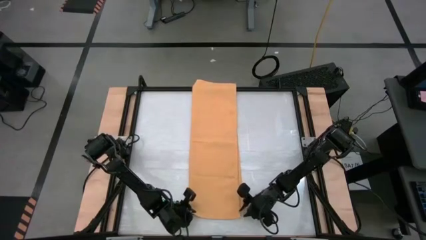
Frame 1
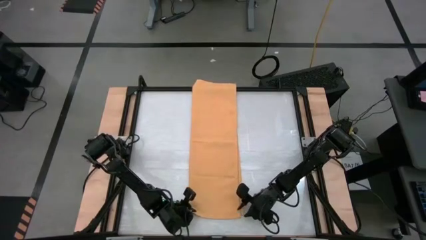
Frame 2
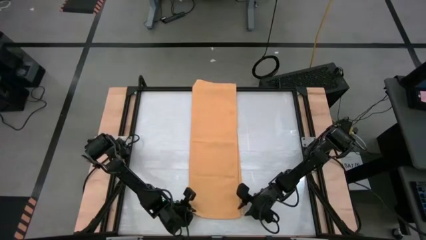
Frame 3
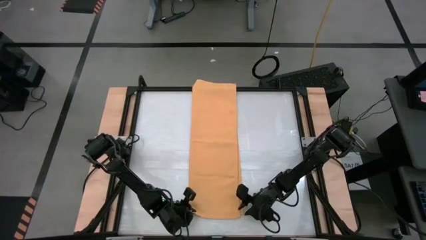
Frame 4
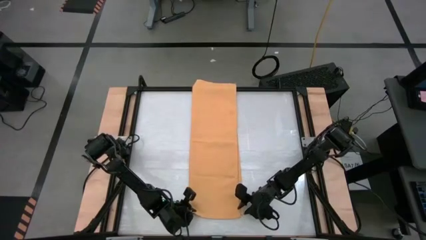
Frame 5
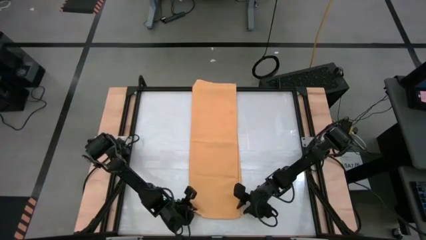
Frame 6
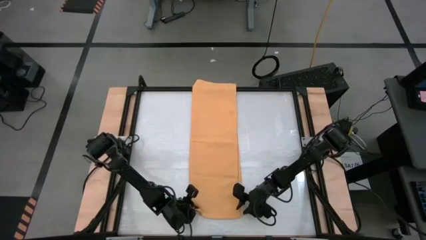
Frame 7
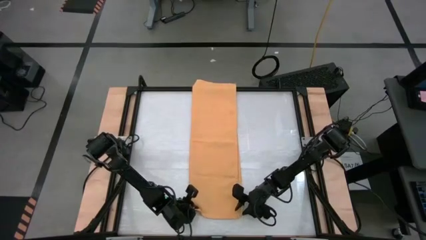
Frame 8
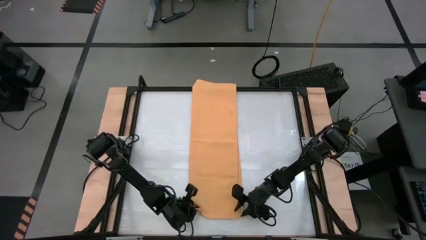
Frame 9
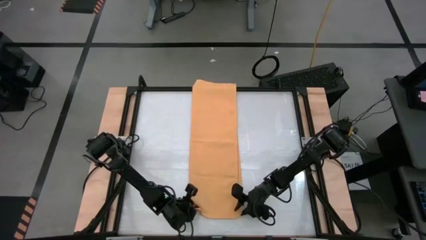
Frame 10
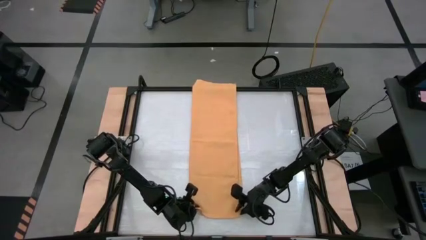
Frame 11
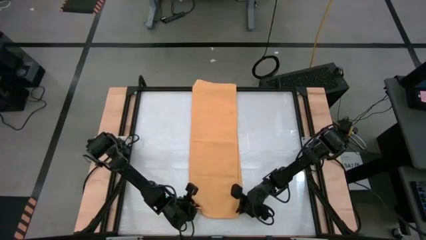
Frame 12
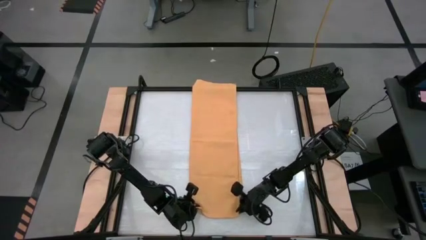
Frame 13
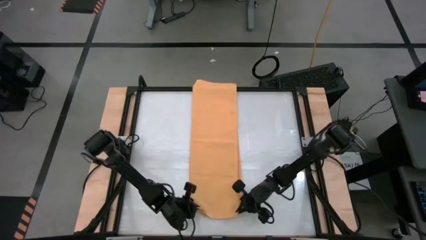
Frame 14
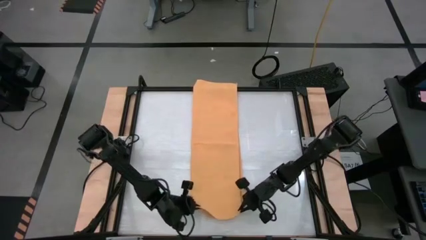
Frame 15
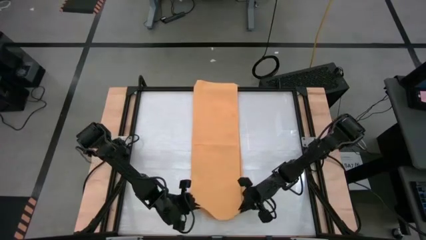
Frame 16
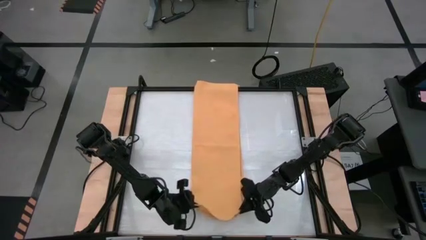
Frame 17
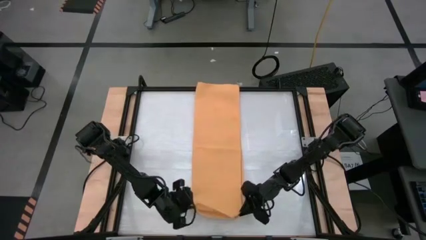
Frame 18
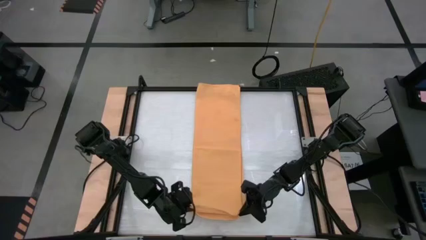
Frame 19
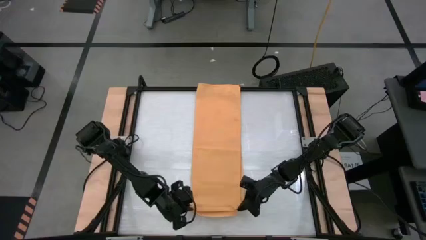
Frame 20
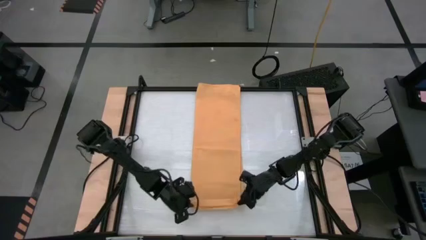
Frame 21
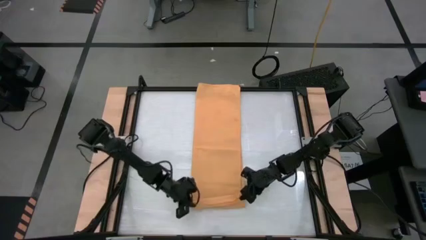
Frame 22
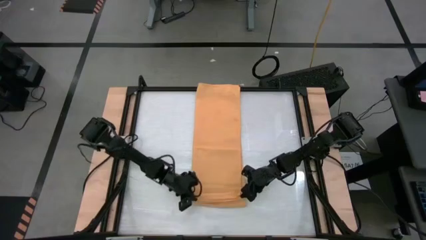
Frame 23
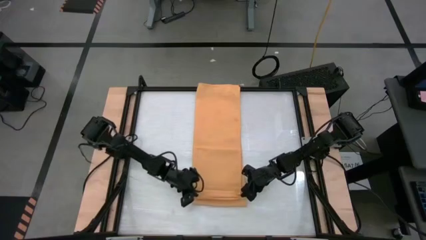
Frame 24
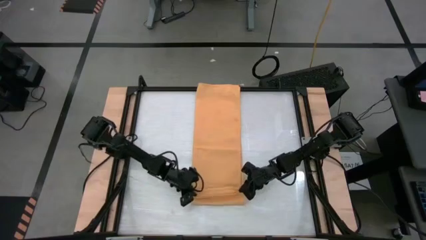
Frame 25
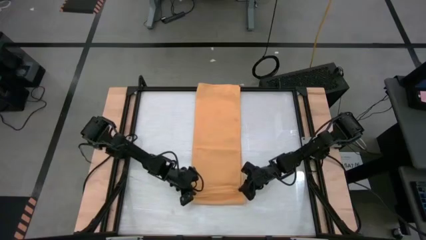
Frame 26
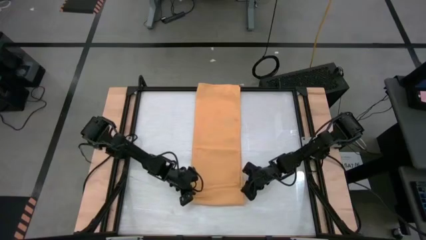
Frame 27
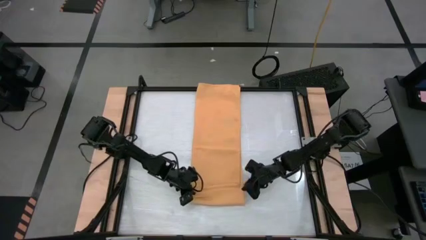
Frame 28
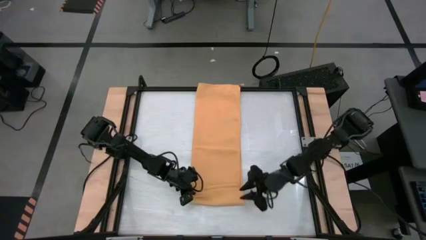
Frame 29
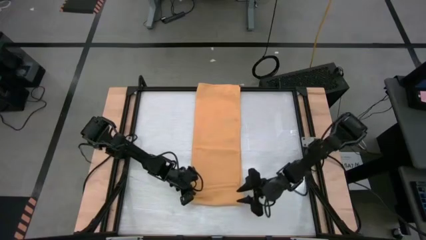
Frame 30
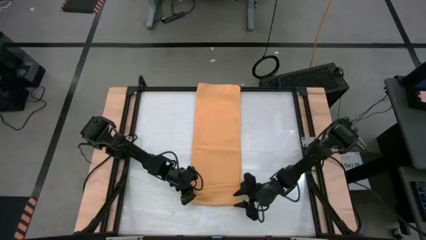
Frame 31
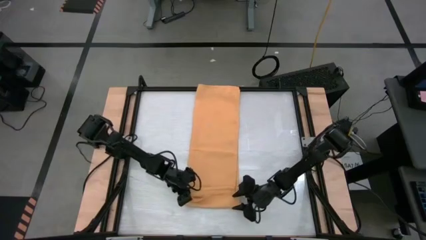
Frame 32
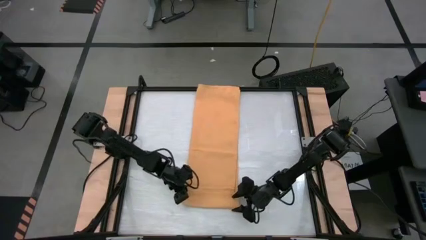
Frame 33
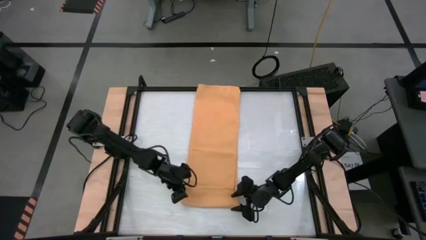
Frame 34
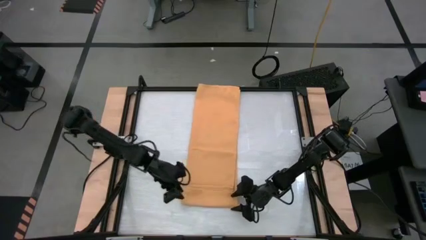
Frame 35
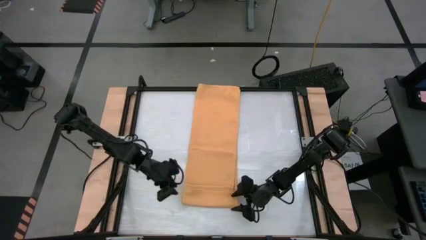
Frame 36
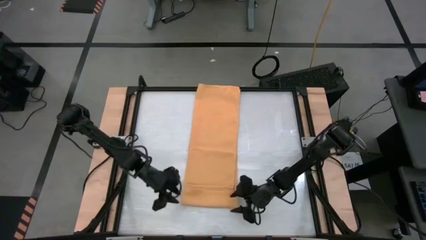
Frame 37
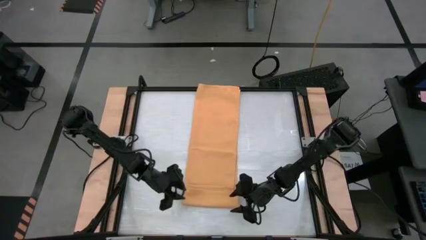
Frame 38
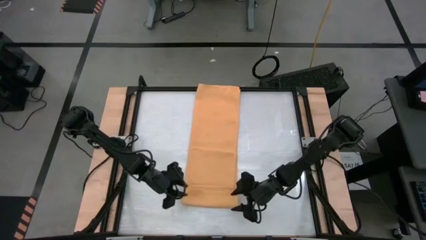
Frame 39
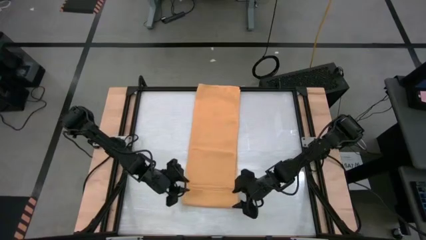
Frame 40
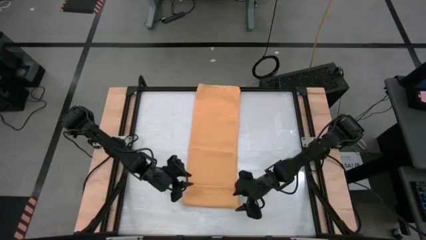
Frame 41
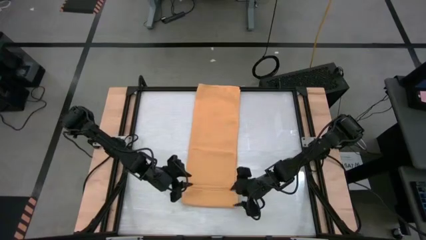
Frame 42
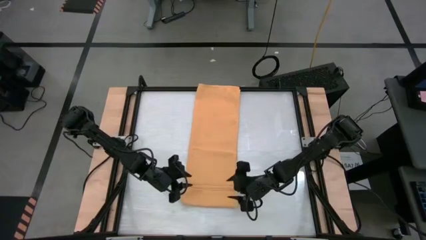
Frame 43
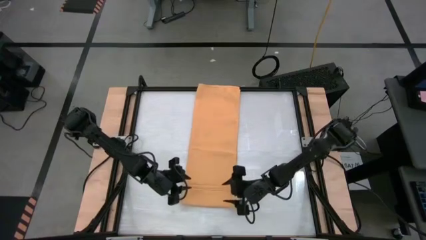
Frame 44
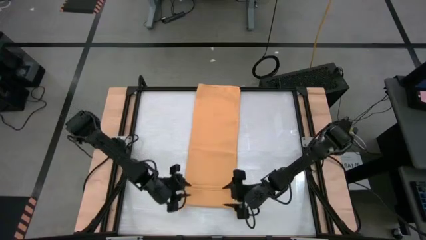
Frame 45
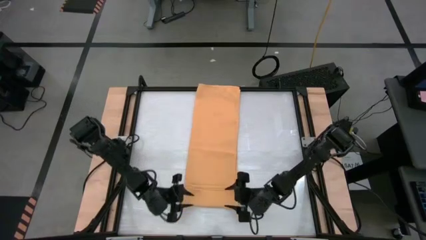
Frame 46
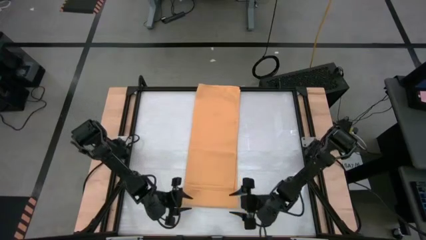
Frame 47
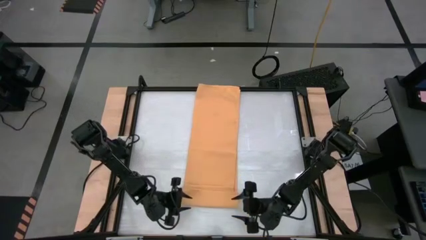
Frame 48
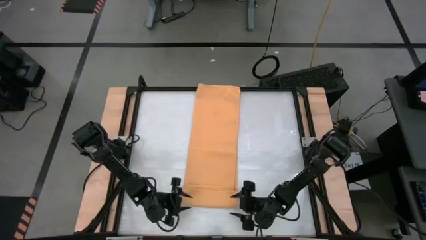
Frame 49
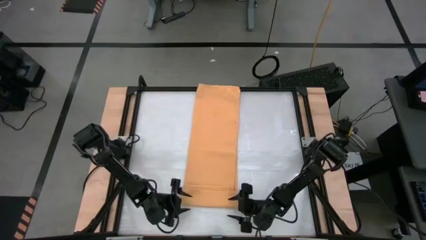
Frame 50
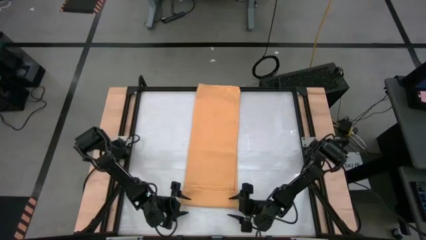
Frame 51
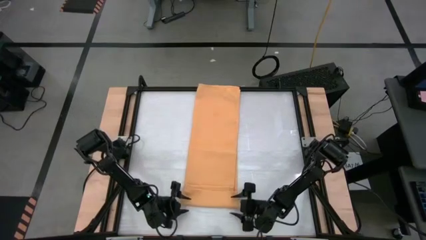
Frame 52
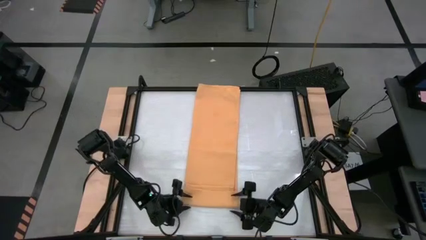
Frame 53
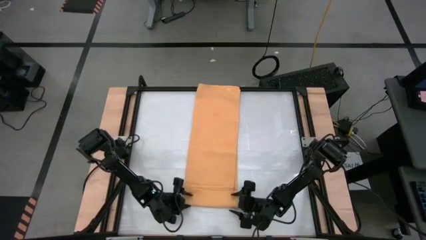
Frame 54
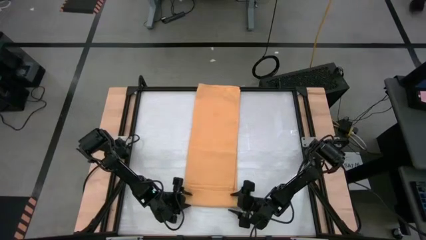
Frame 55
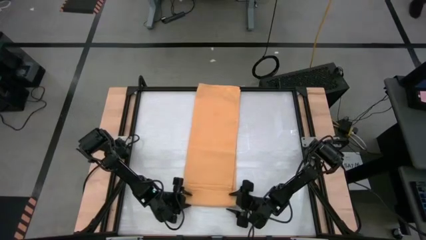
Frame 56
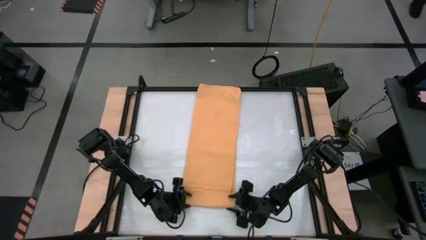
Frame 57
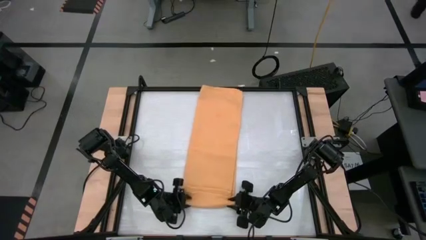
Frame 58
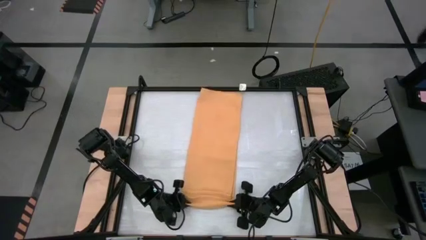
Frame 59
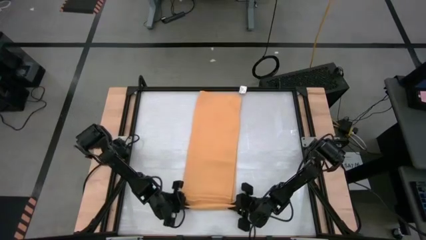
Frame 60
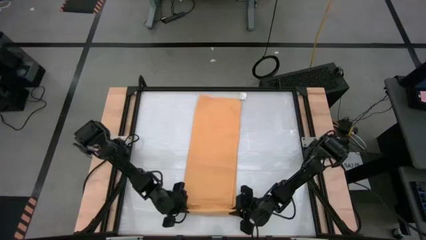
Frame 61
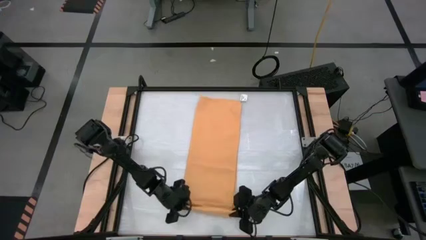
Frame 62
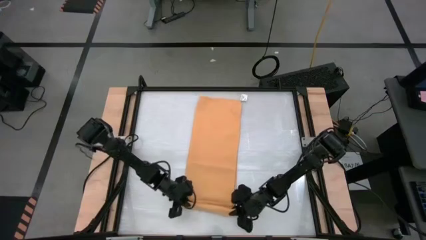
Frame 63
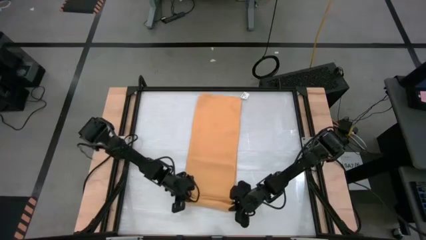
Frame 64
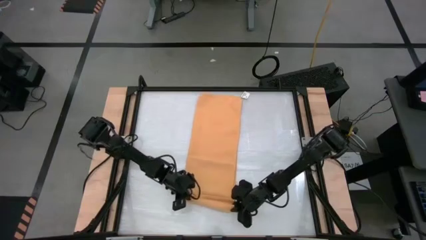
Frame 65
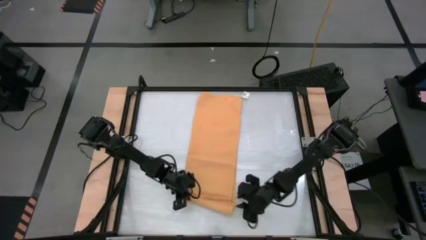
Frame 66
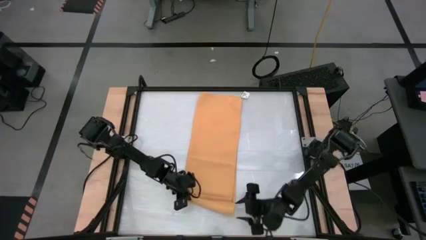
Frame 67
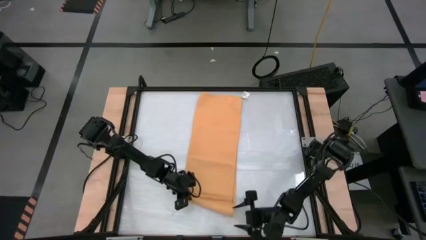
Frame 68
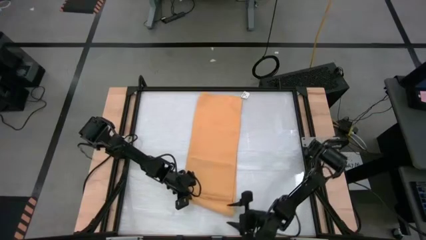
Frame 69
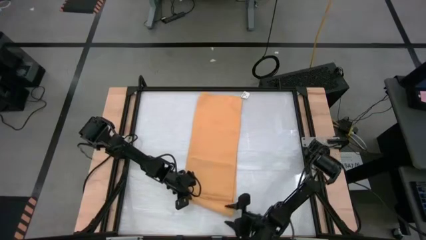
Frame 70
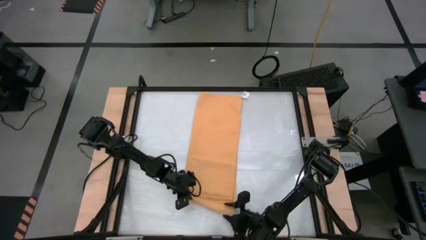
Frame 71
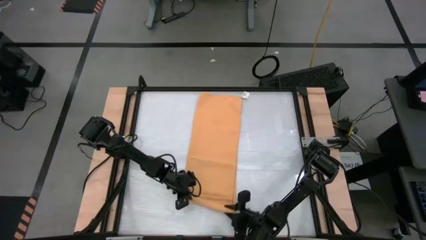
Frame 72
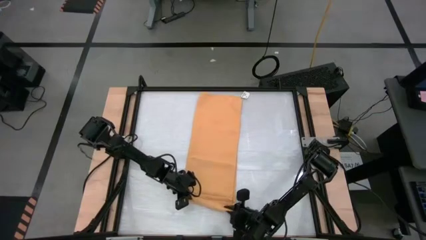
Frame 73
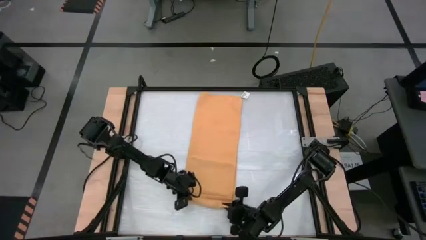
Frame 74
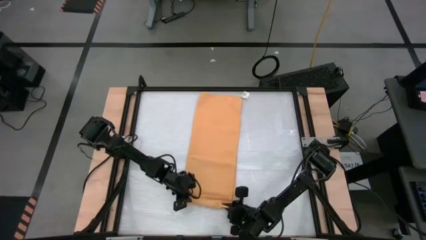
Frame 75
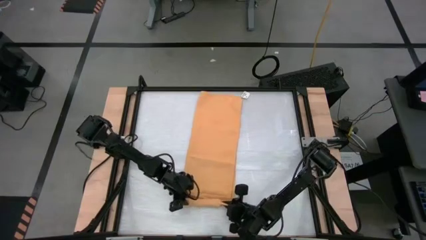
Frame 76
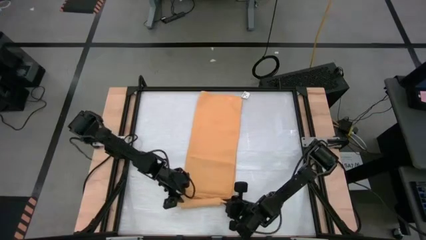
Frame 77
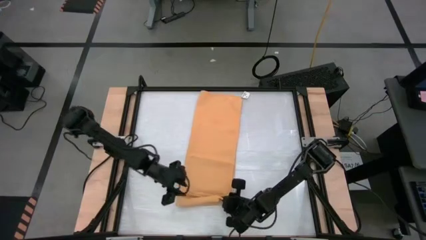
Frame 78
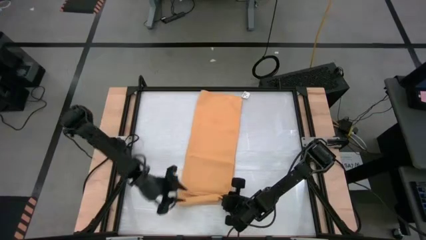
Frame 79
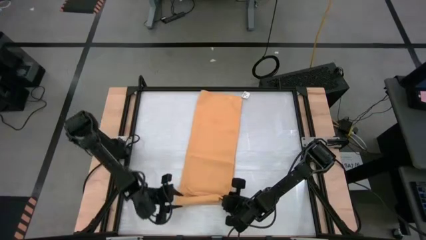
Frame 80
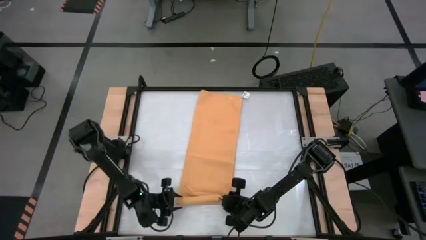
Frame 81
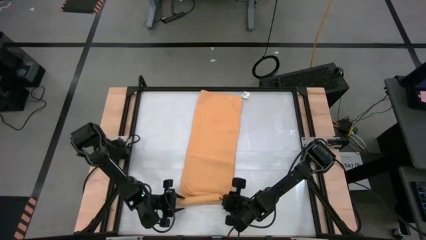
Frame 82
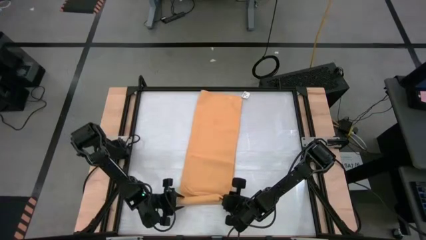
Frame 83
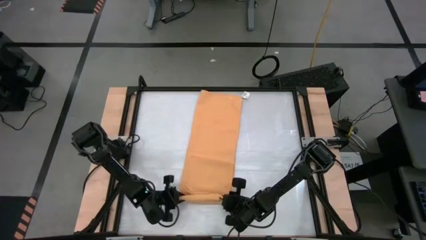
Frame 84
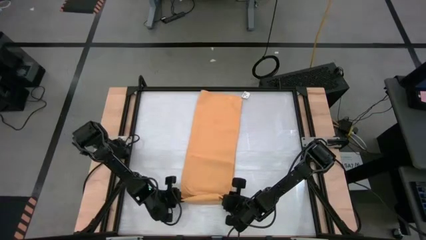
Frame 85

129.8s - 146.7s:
Task: Roll towel into tight, uniform cylinder
Roll the yellow towel
